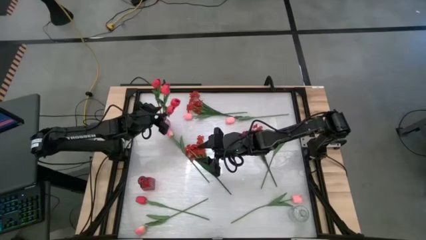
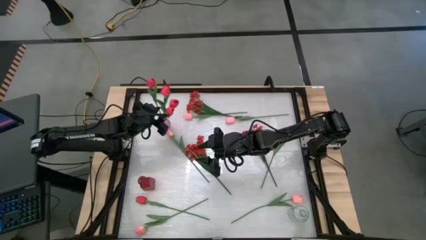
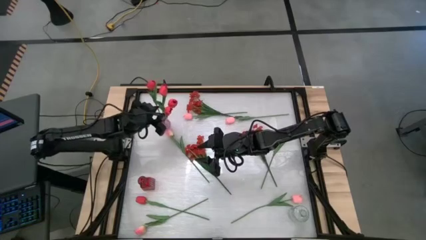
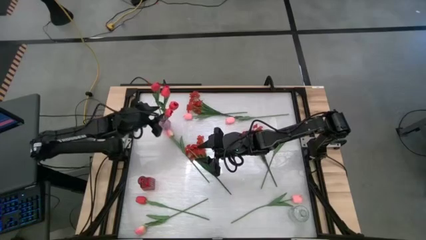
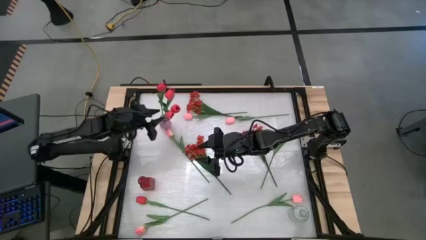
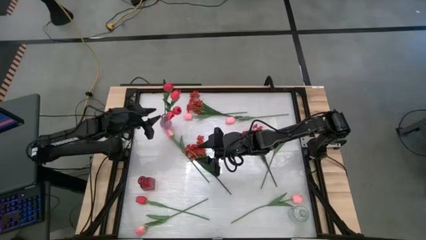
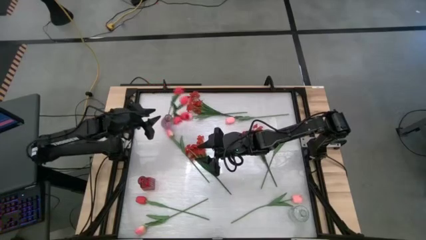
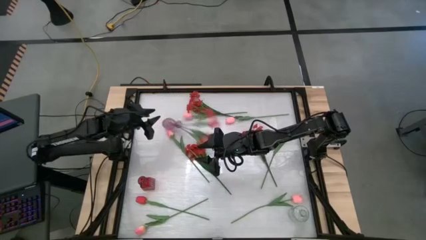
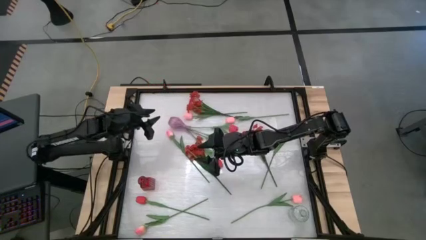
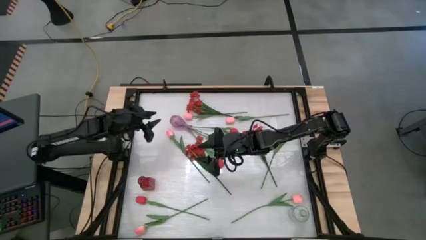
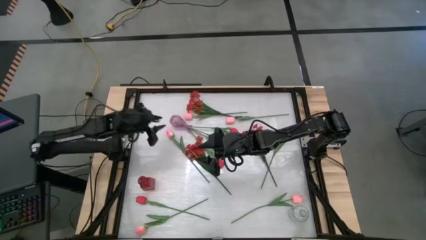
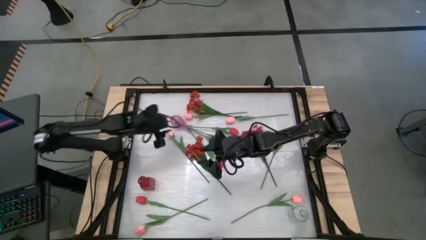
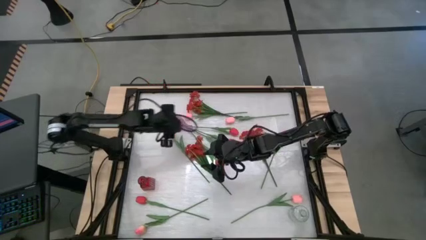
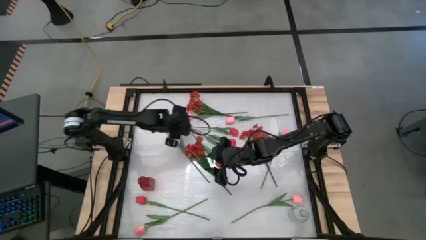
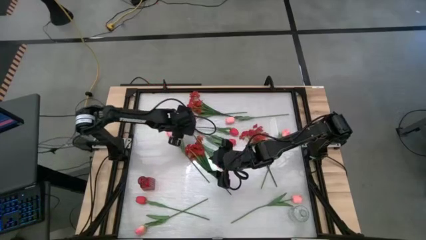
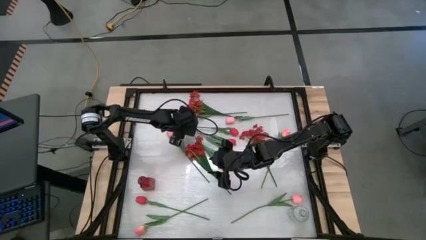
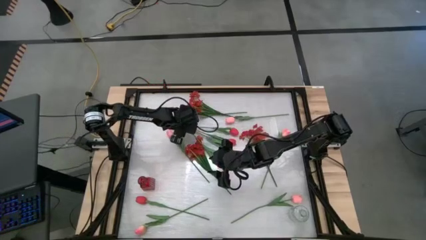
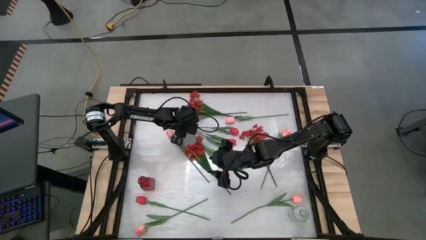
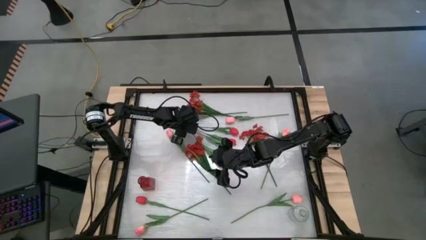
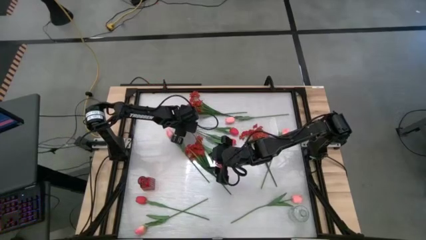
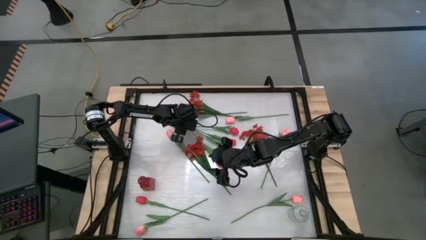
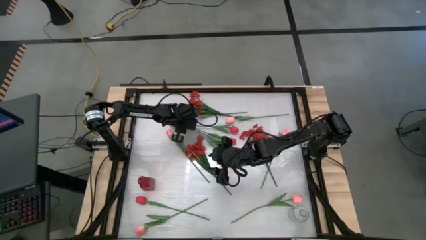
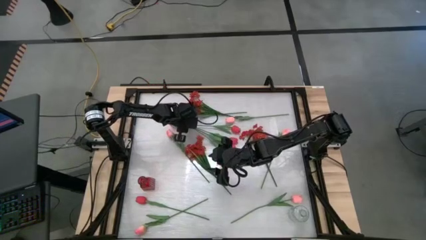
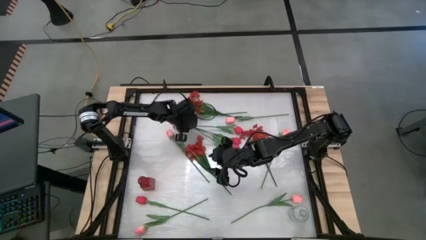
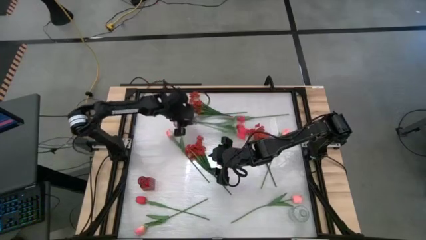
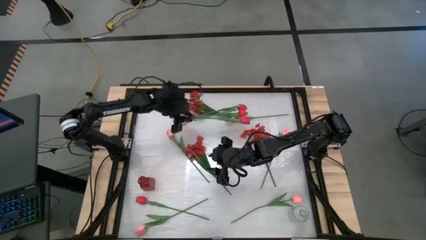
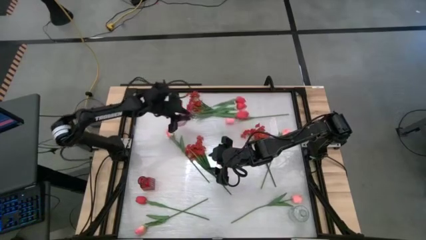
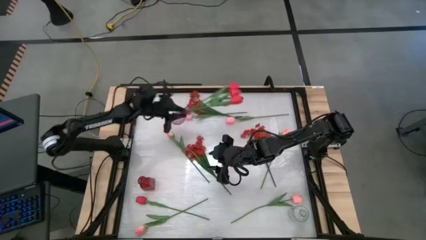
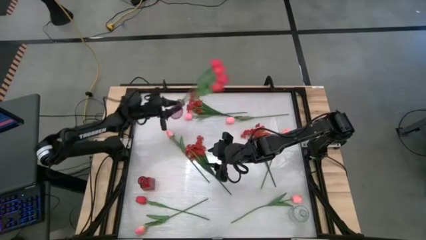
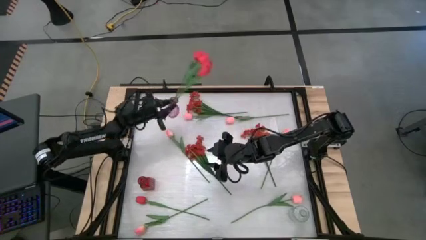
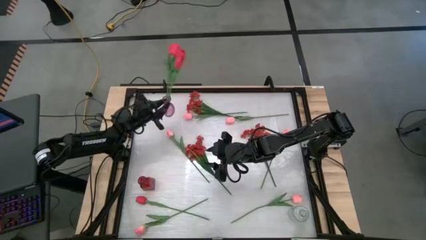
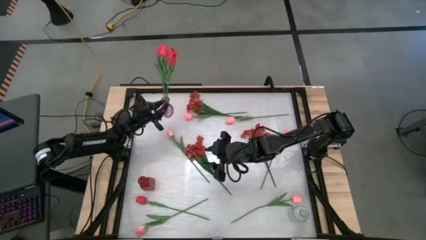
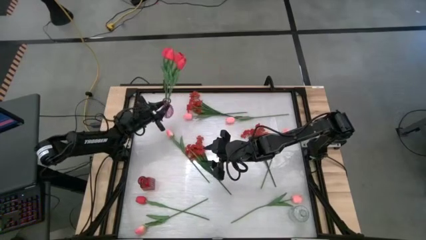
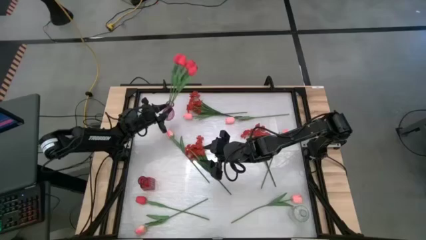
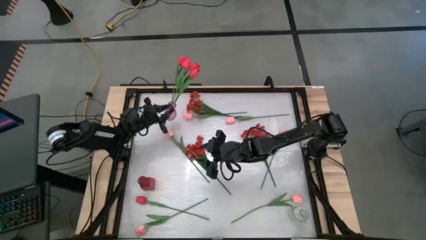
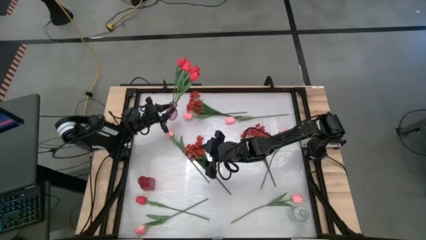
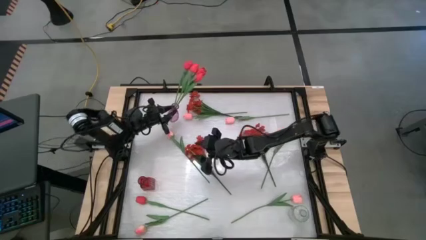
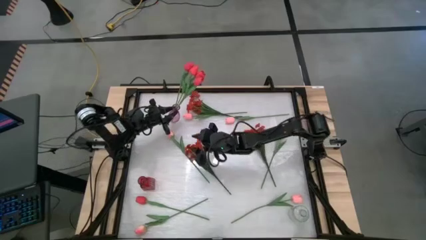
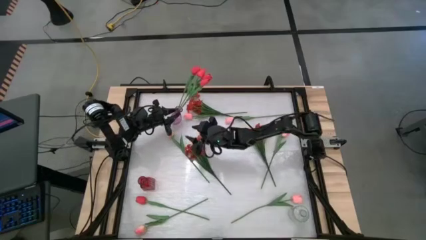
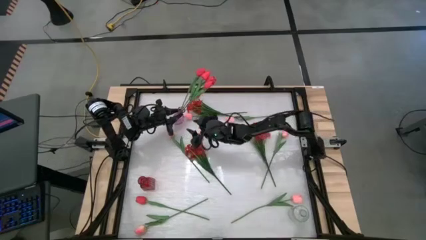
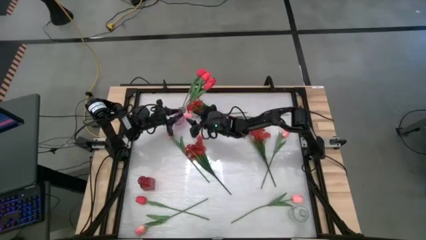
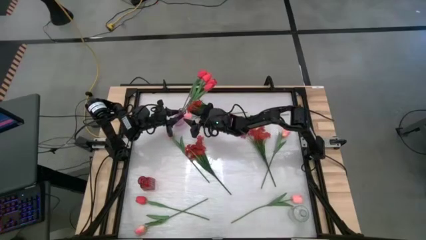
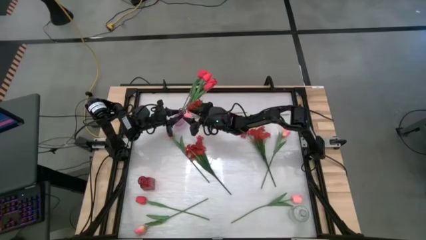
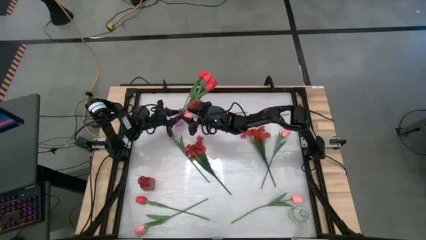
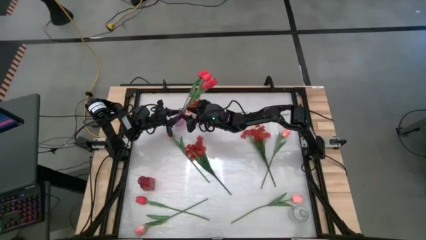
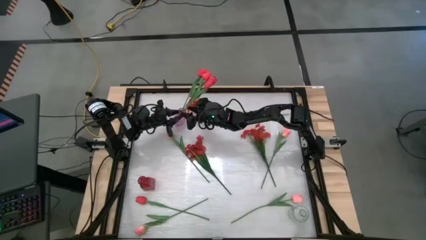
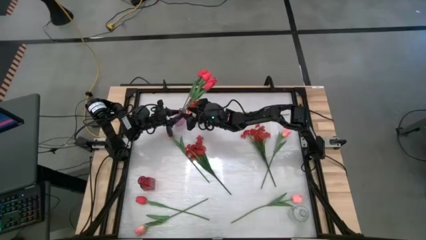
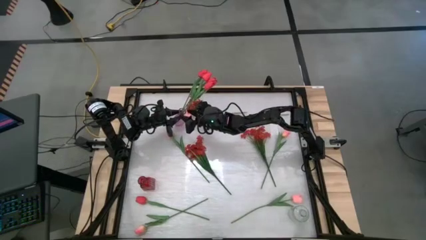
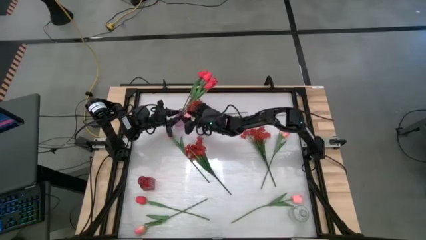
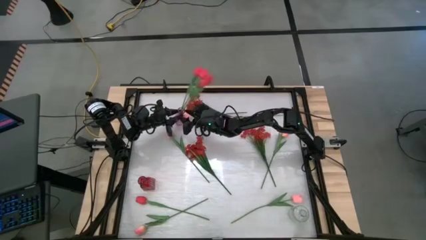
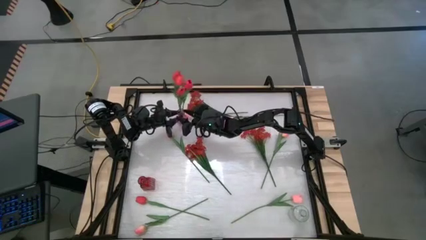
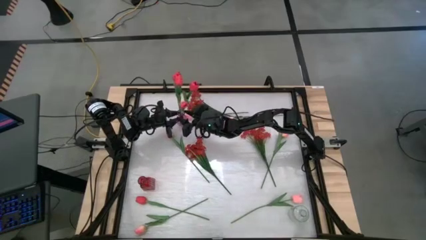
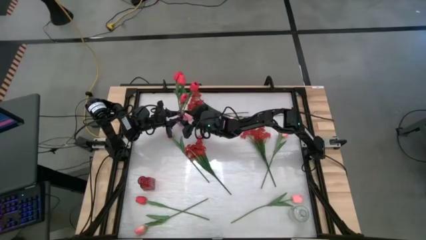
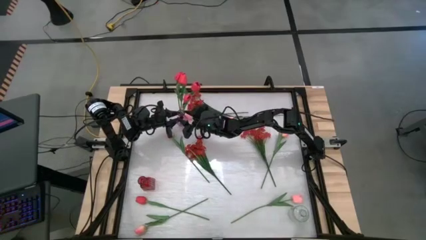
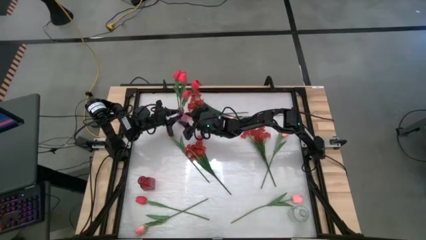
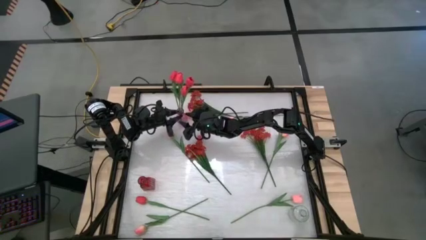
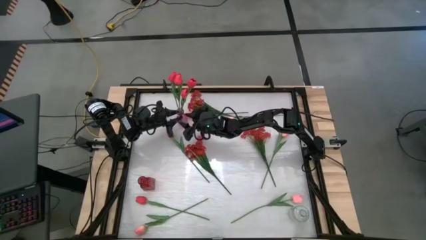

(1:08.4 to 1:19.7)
Task: Sort flowers into vase by color
Adjust the purple vase
